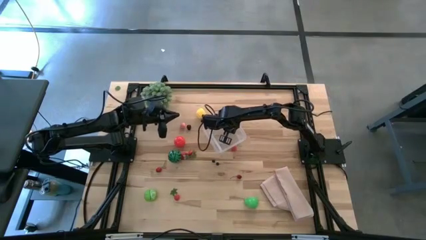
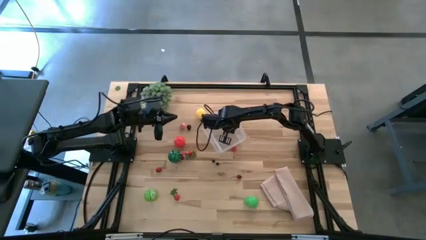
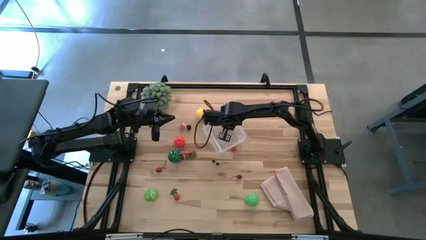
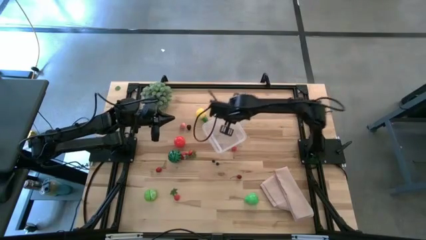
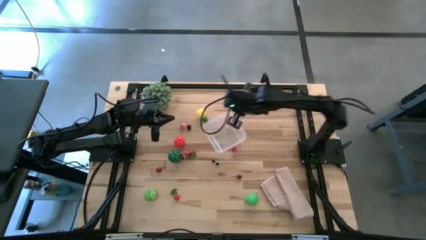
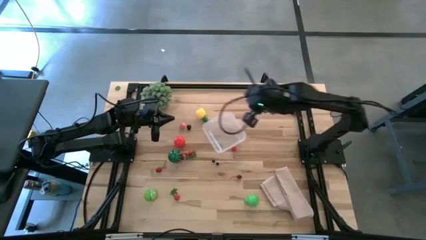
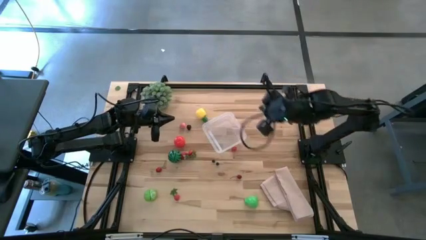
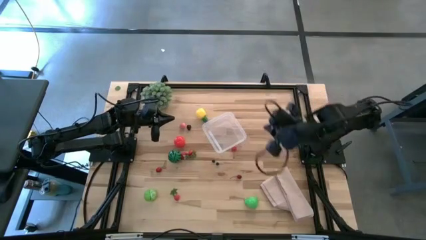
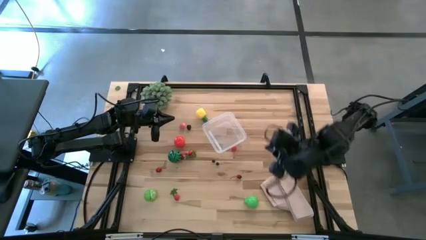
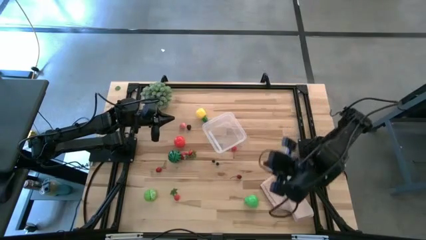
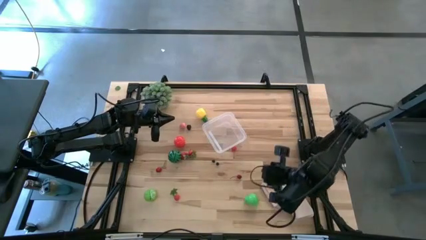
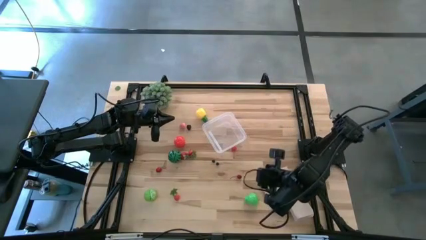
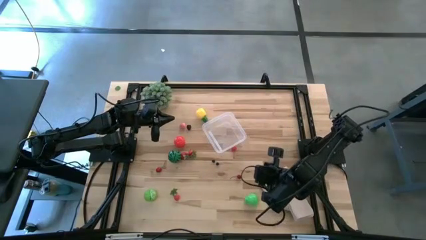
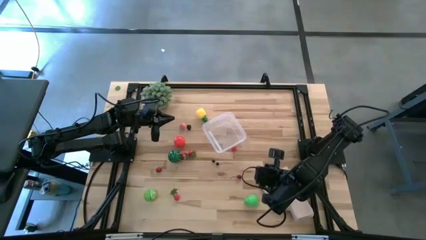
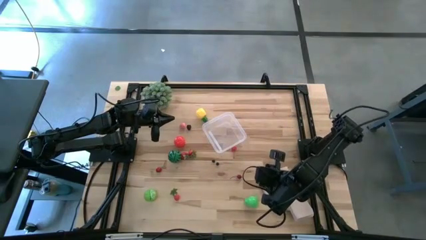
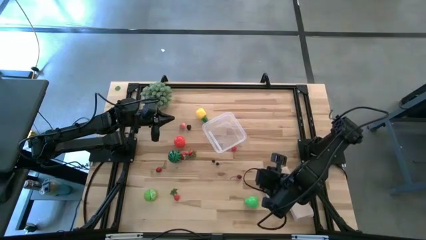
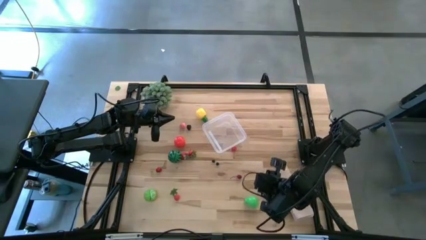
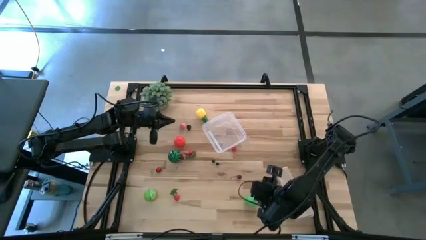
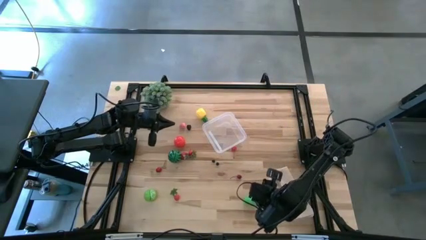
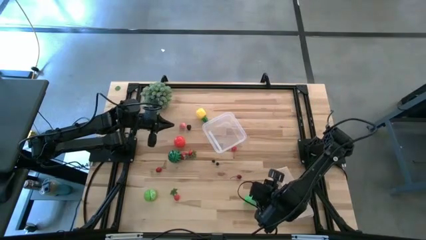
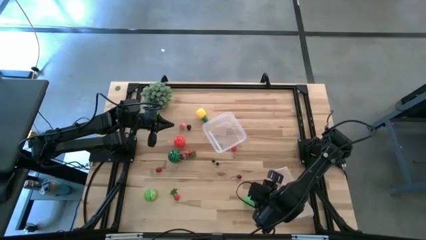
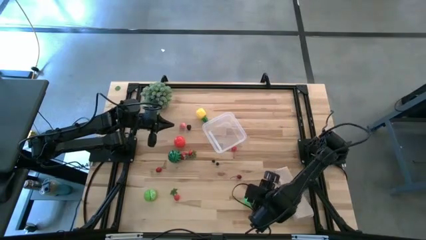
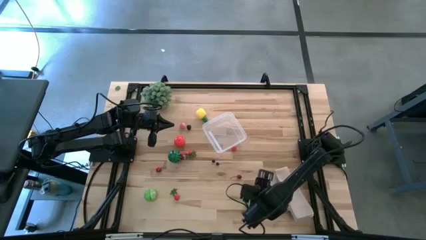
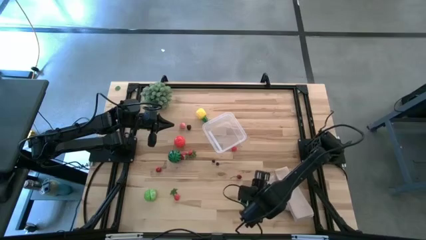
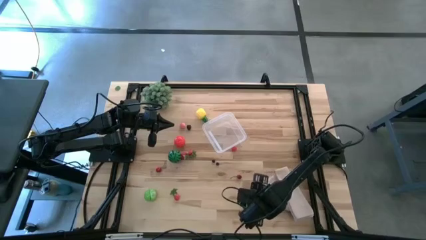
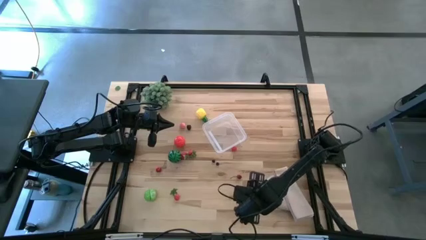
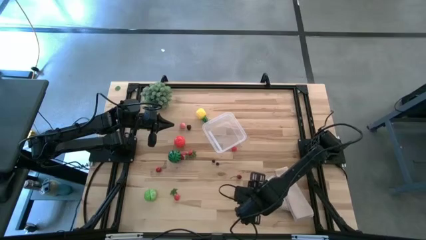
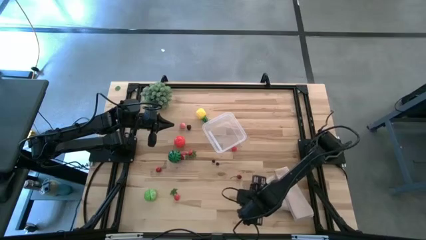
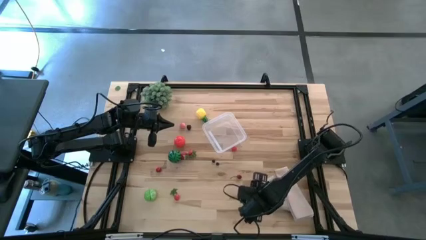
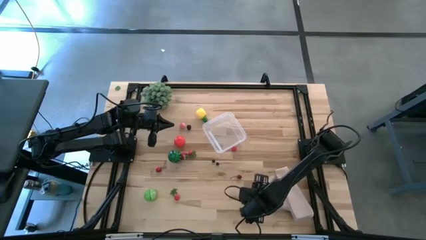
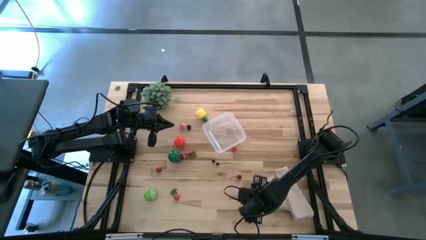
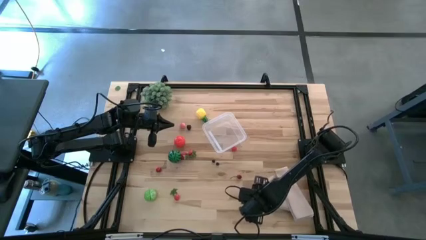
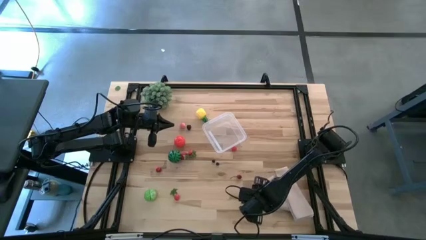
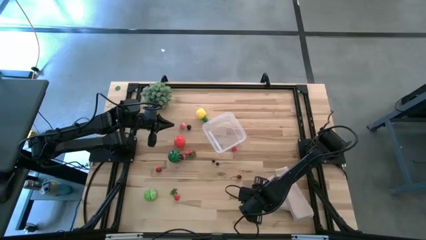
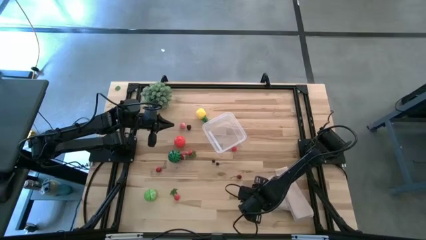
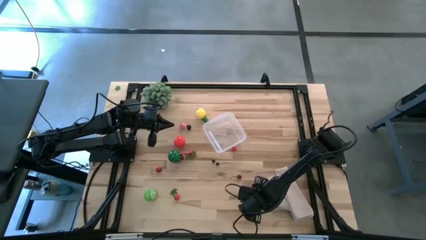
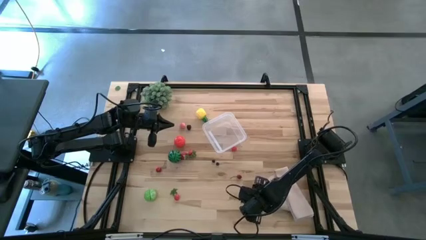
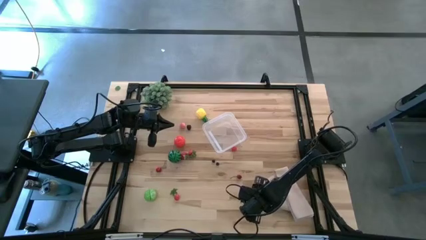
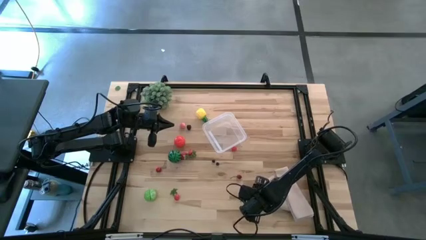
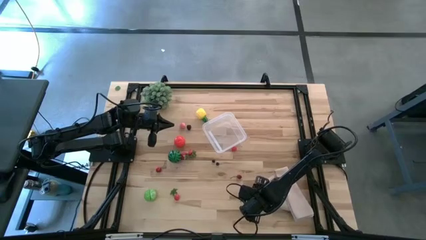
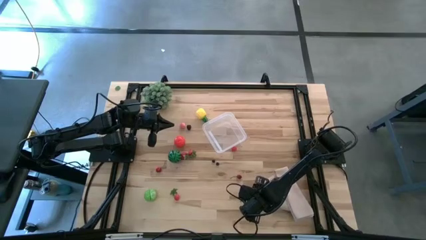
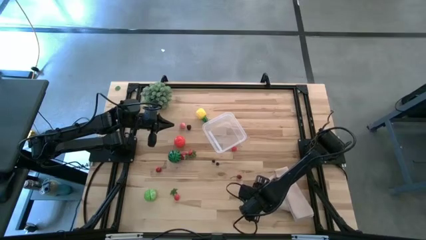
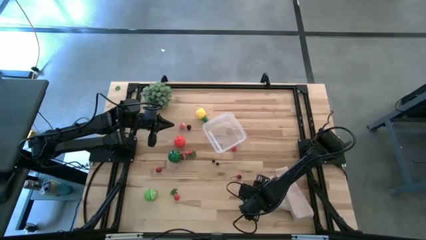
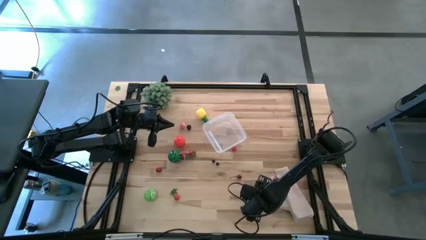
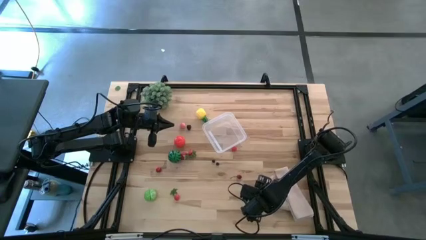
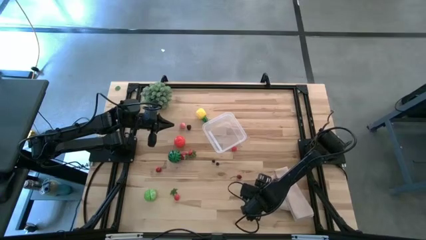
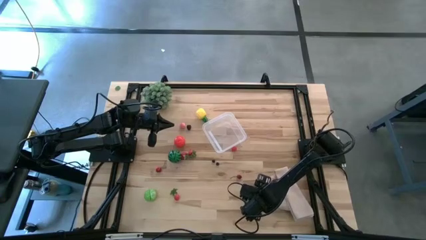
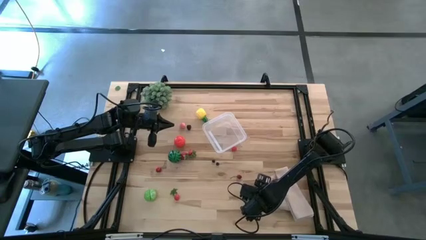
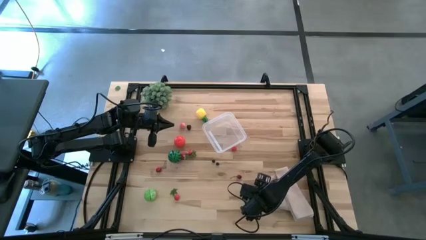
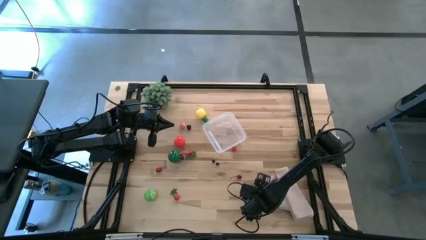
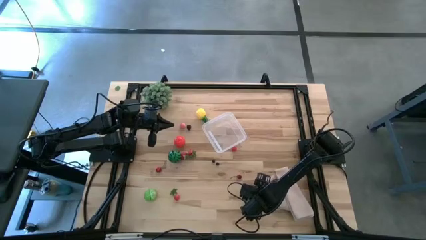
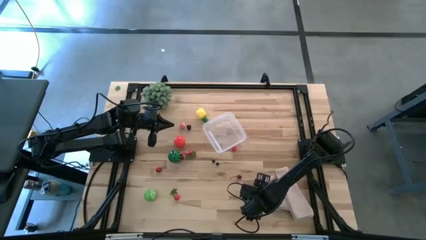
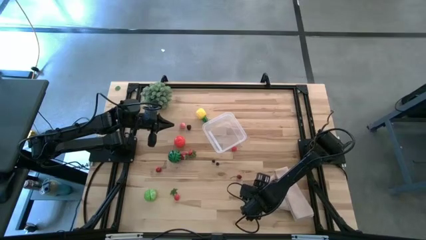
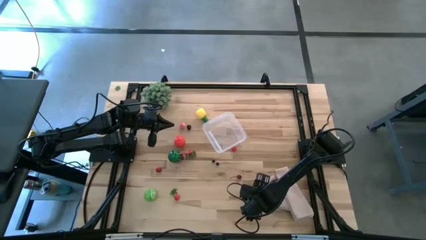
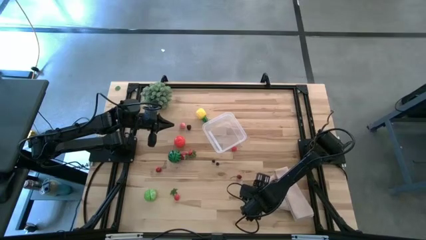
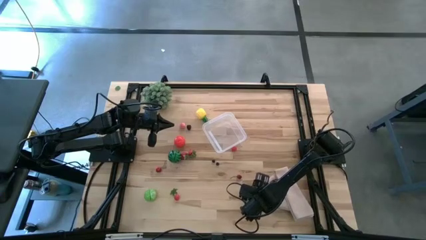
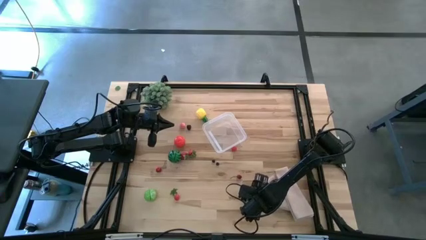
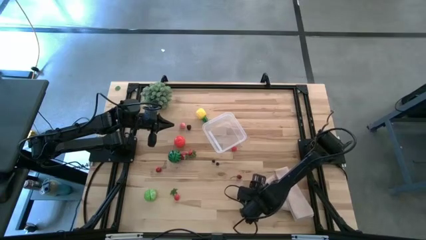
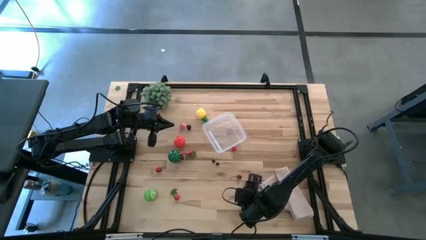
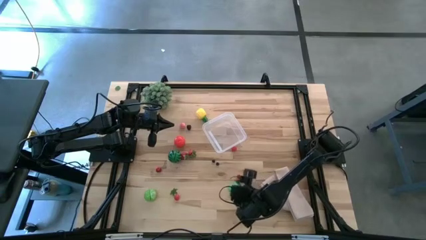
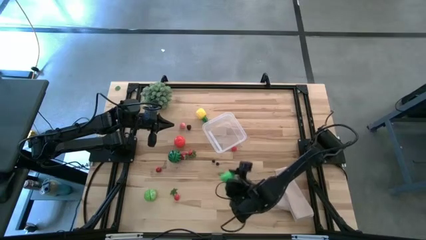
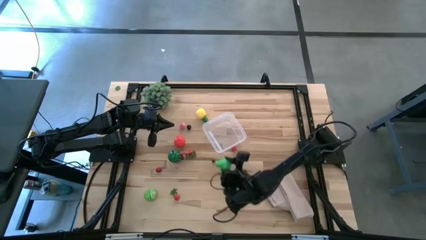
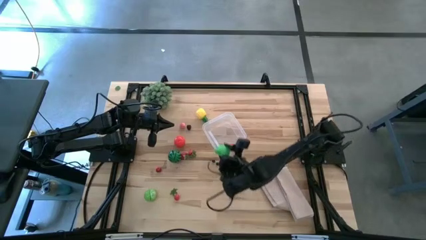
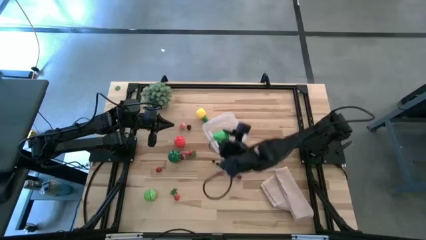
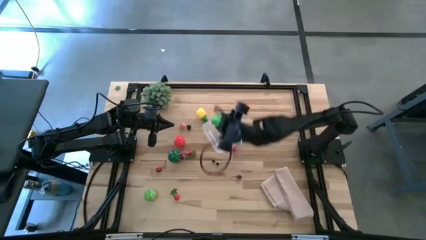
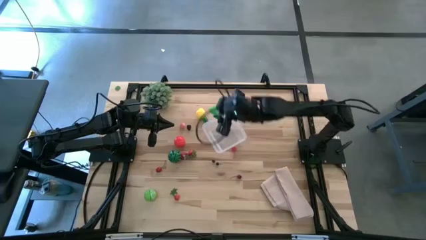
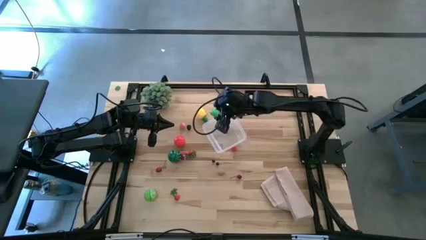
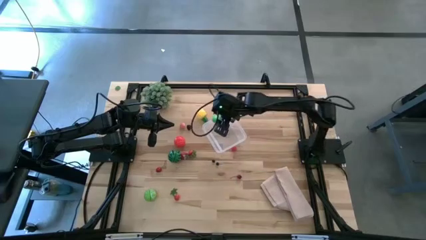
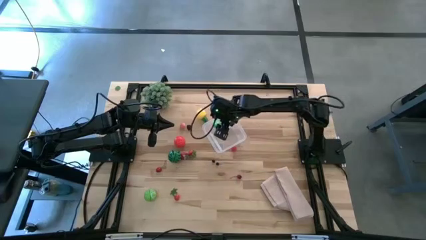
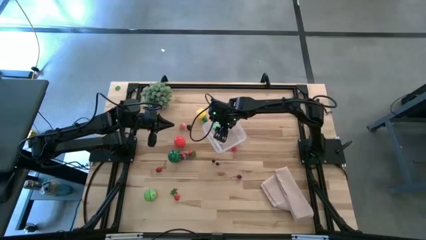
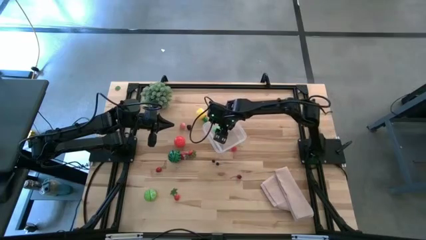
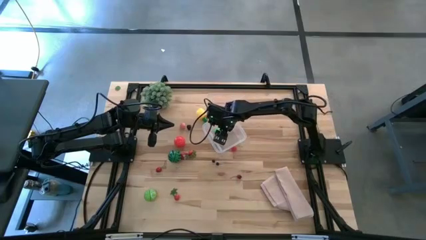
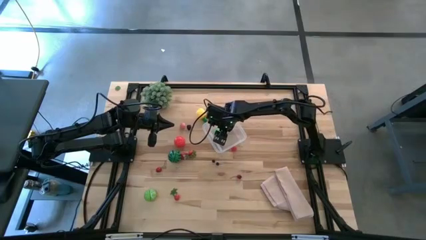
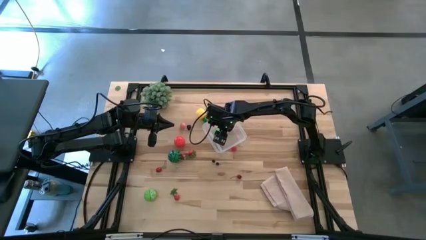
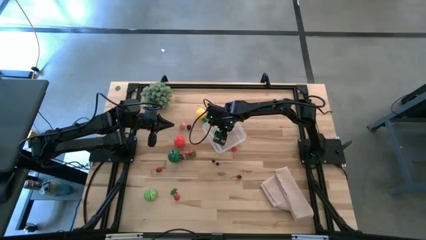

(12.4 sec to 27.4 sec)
Task: Pick and placing Produce into tupperware
Put the green pear into the transparent bin
